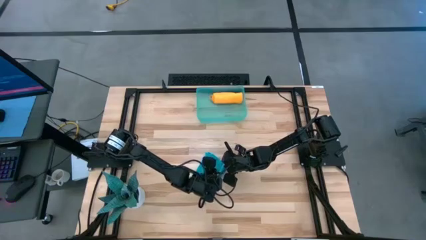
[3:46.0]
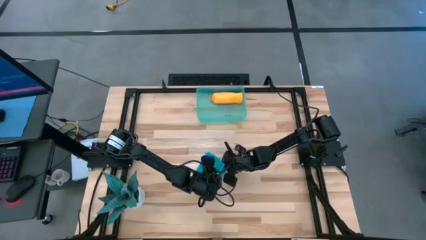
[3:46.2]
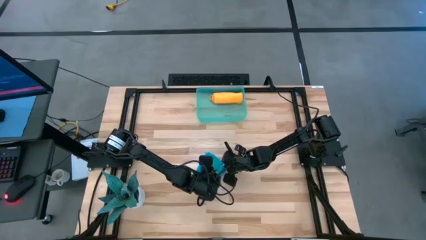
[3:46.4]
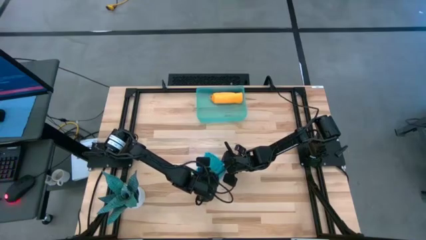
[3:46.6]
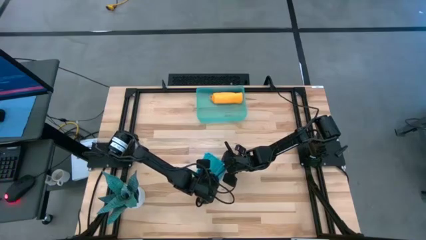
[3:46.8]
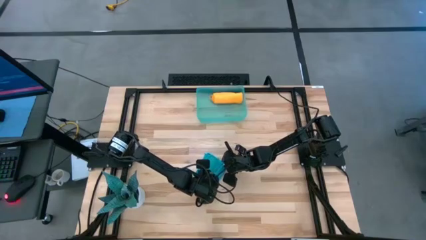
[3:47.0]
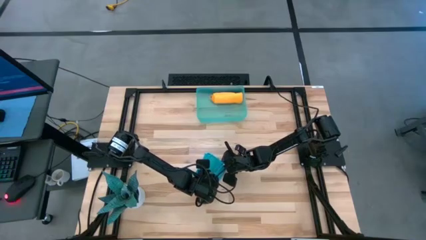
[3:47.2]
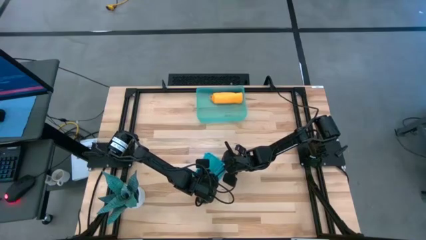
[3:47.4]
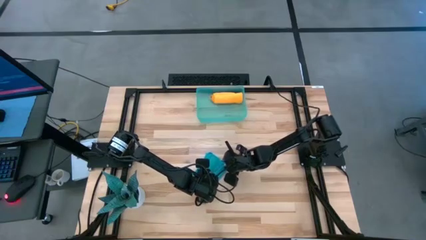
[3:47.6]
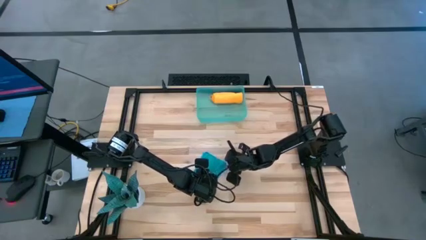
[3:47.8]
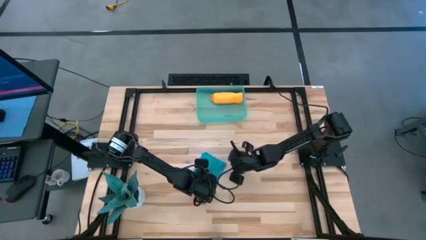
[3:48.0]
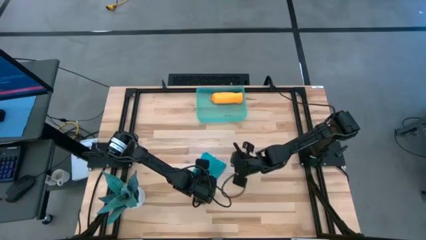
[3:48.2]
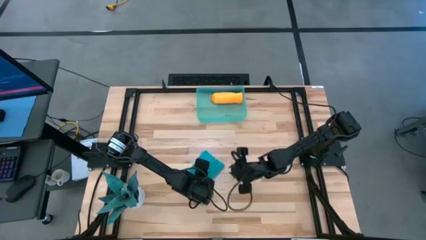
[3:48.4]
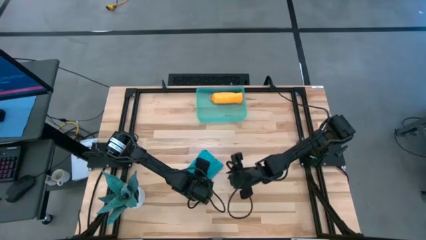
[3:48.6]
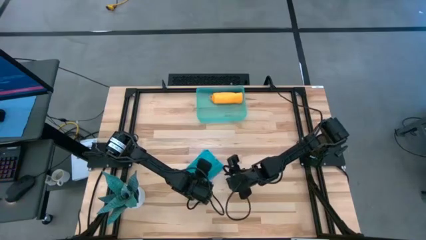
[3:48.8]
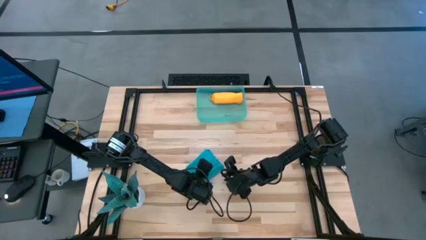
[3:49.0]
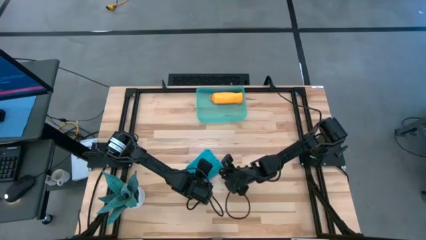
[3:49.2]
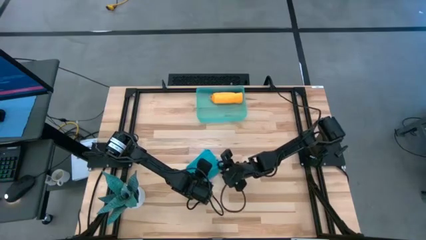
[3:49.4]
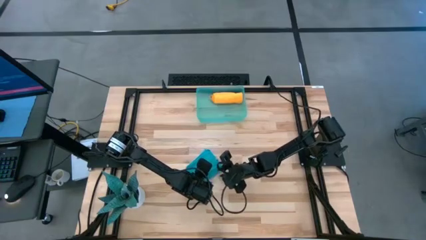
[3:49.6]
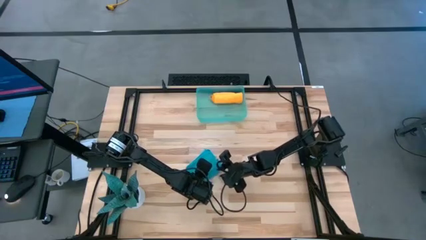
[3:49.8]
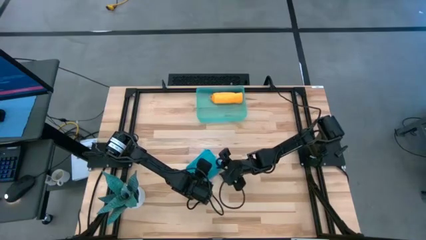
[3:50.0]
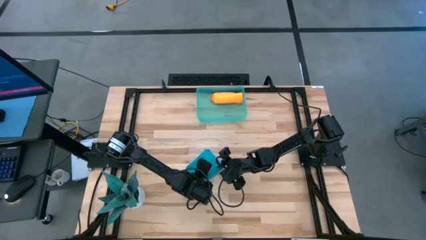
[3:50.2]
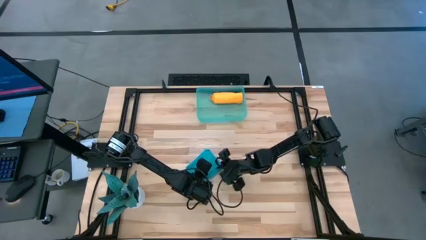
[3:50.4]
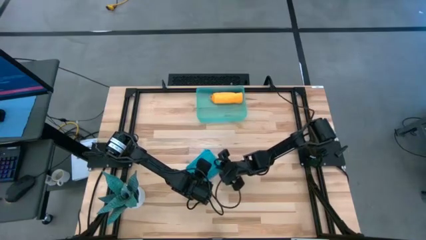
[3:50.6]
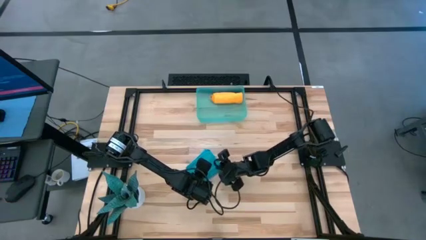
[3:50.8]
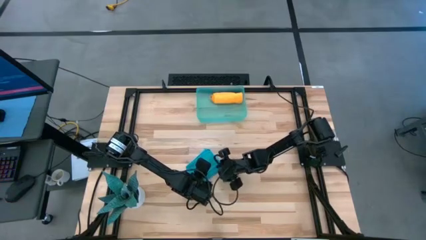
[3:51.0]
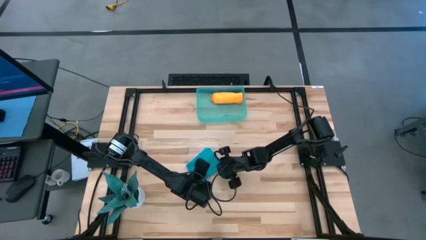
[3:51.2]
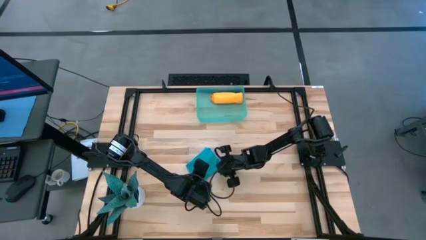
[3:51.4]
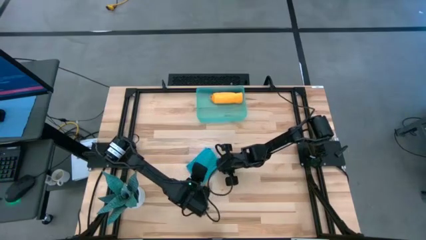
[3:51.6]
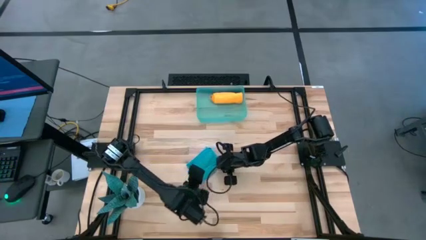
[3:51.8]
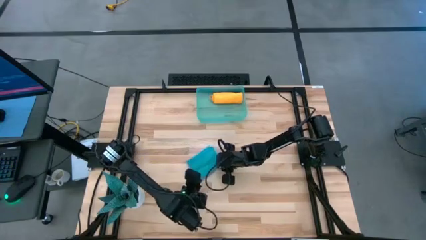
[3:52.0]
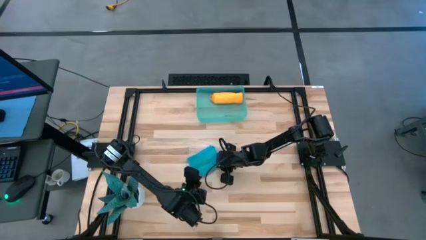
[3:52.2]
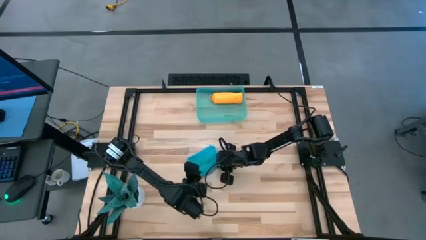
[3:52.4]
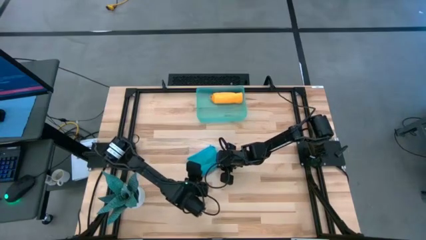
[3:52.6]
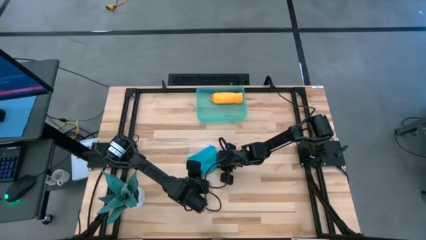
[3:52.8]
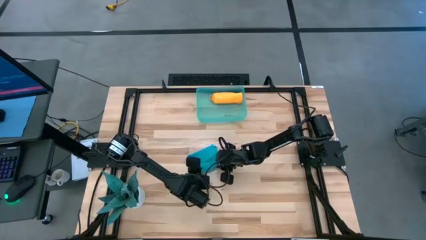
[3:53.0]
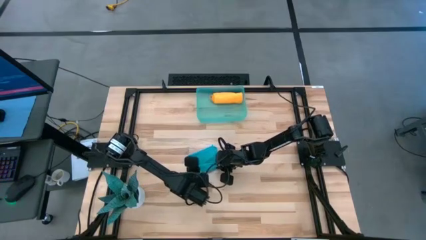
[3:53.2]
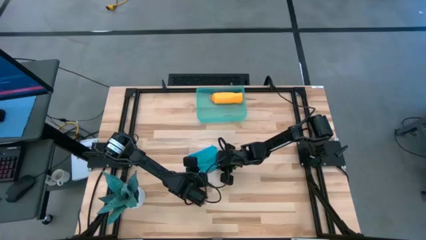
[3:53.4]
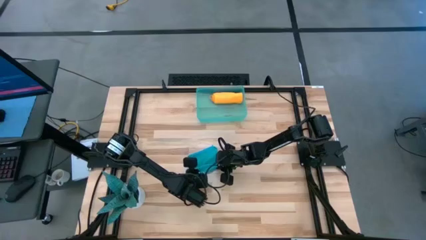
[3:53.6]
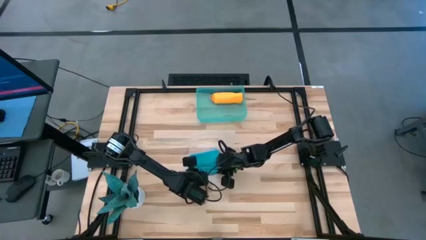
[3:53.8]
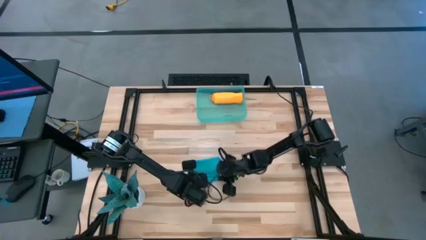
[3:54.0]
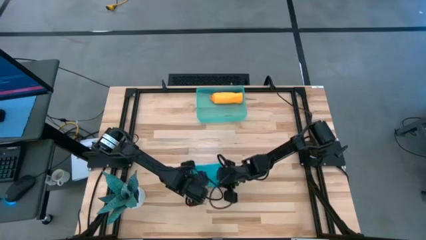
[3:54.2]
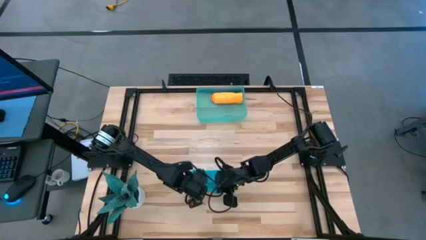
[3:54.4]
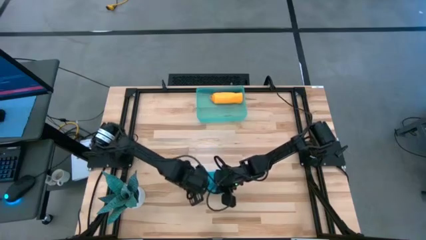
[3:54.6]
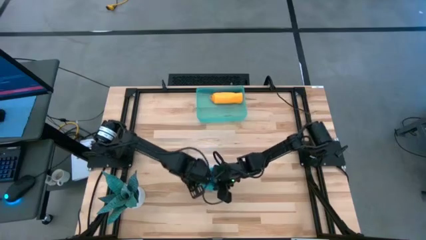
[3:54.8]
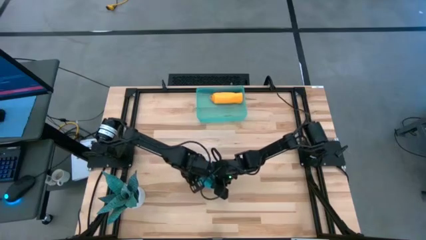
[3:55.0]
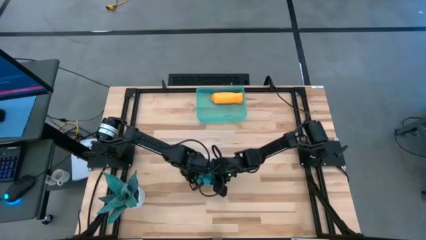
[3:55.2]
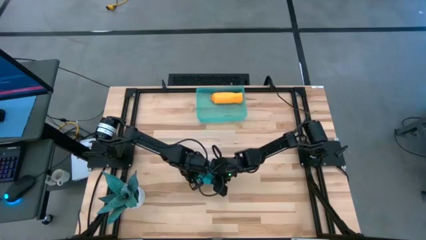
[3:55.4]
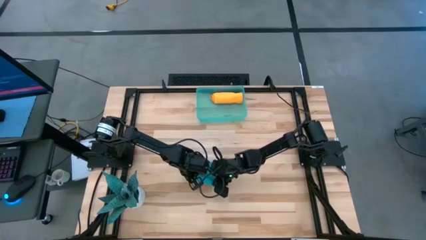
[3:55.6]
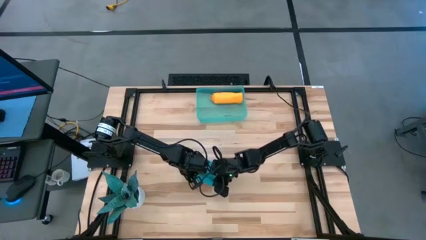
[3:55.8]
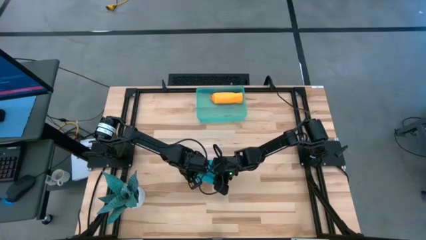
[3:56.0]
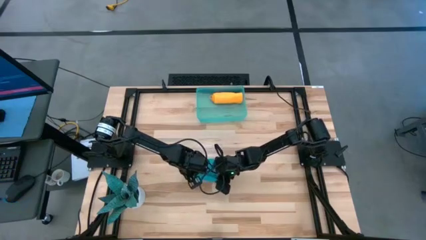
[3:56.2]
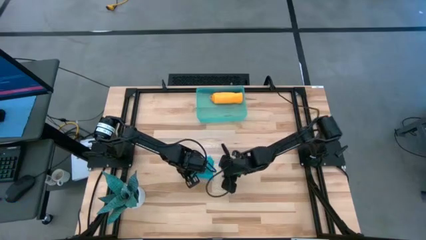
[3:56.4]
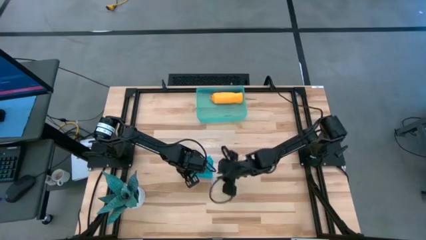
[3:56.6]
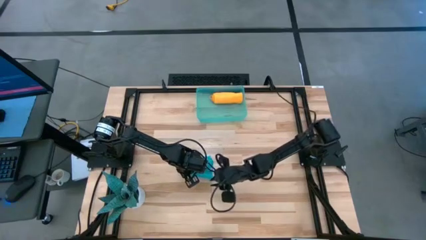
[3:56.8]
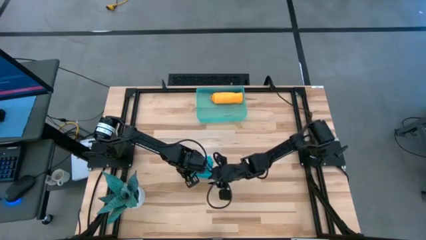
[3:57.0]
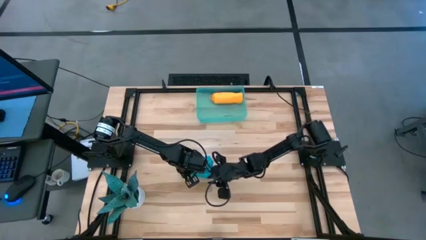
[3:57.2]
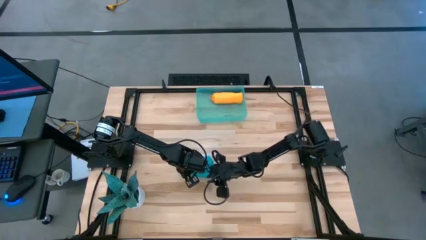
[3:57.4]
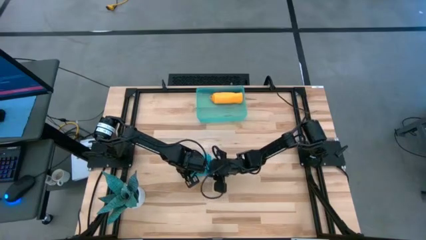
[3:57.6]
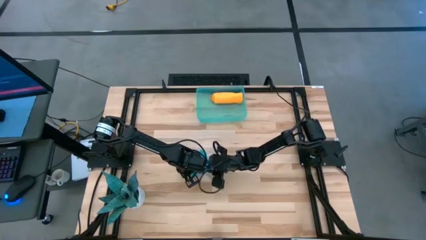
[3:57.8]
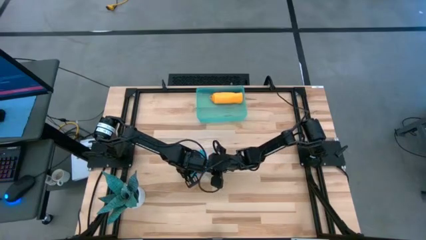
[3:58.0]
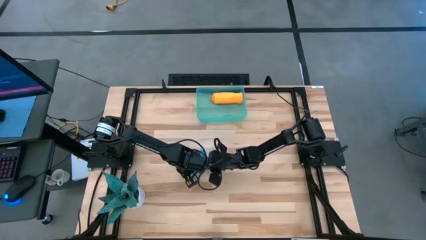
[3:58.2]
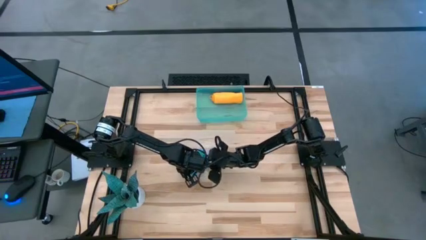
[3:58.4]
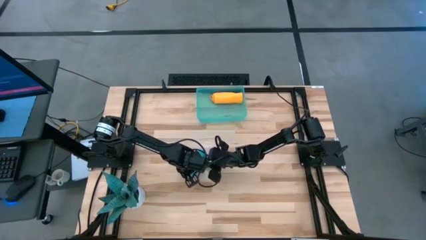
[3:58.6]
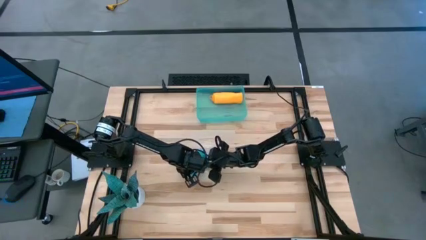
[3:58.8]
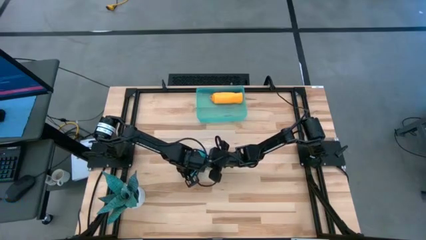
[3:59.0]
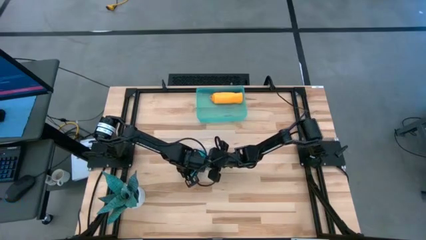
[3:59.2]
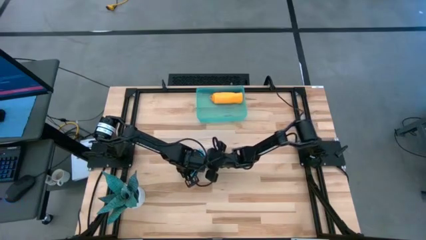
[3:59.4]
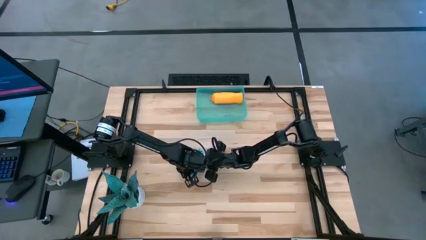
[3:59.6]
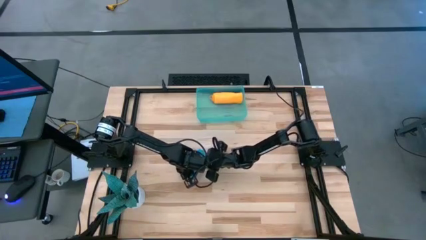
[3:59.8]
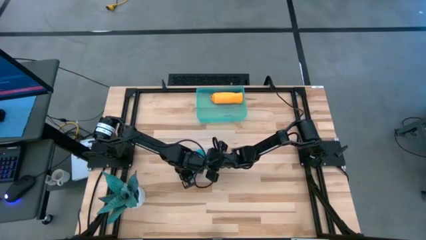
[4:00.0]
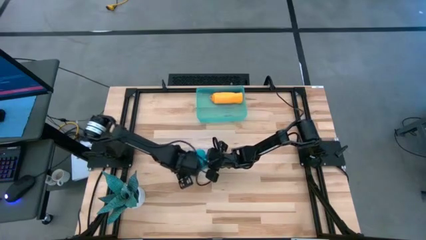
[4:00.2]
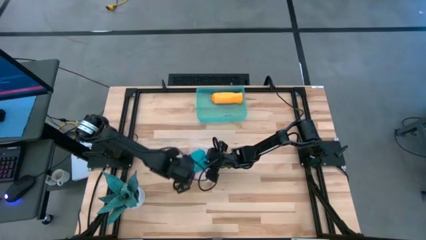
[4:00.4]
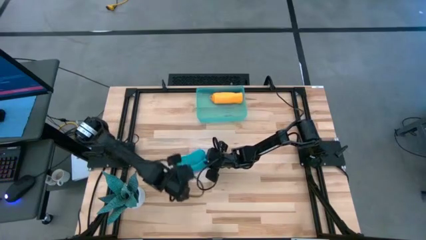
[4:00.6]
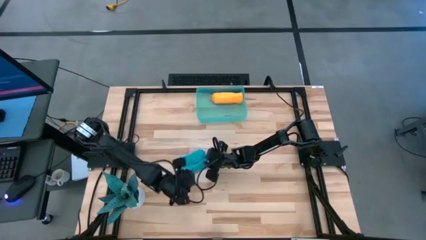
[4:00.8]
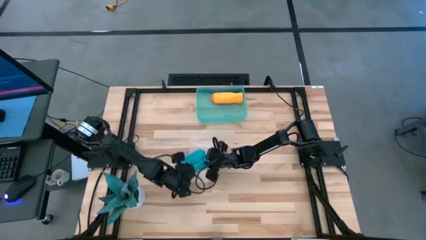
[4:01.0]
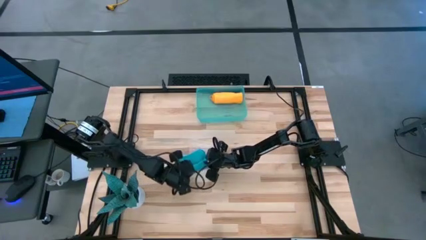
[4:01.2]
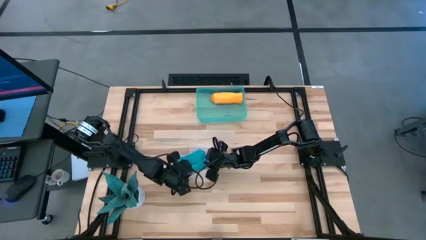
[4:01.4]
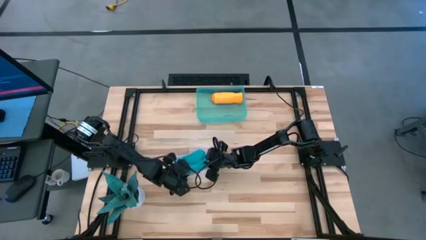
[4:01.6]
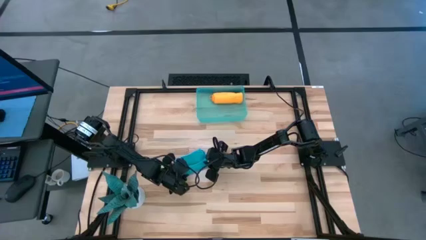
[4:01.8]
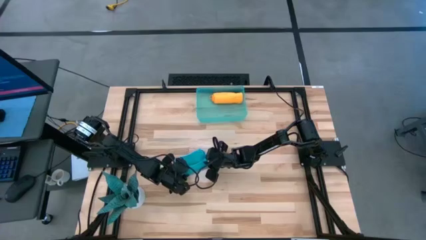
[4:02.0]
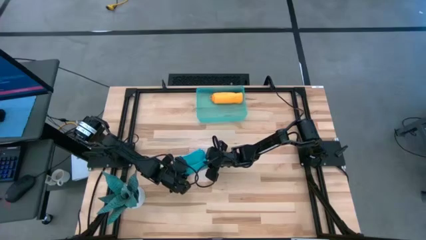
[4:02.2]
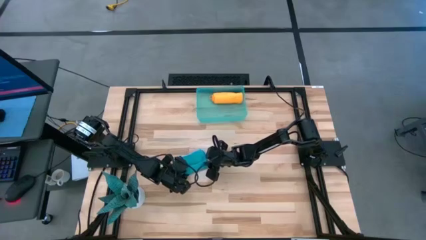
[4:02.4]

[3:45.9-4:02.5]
Task: Roll microfiber towels into tight, uniform cylinder then place into a basket
Roll the blue microfiber cloth on the table
